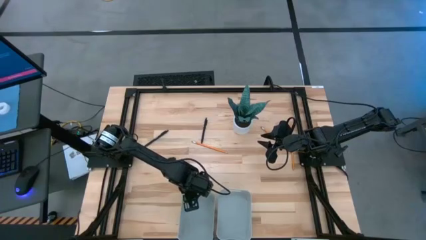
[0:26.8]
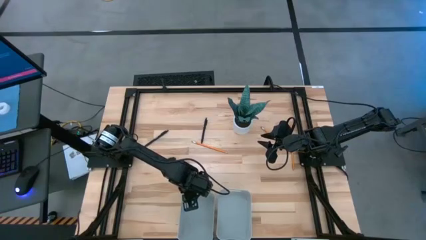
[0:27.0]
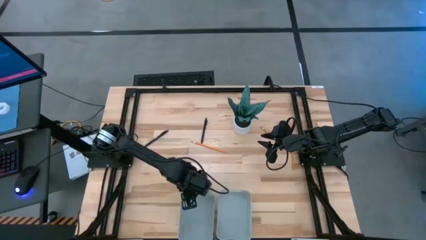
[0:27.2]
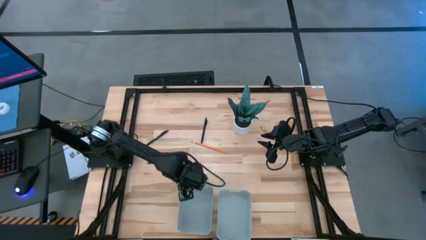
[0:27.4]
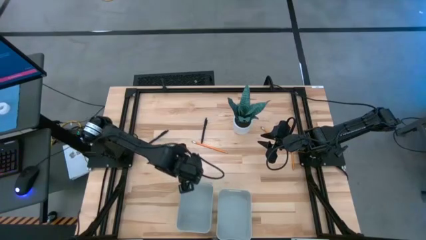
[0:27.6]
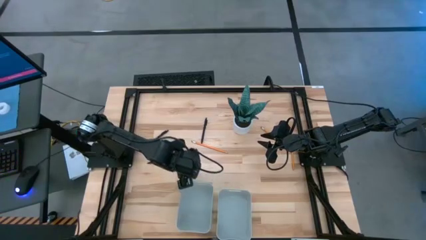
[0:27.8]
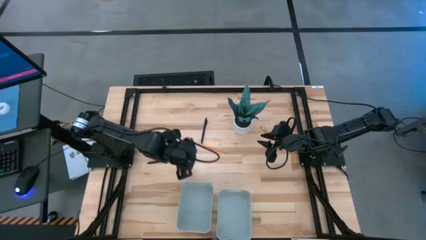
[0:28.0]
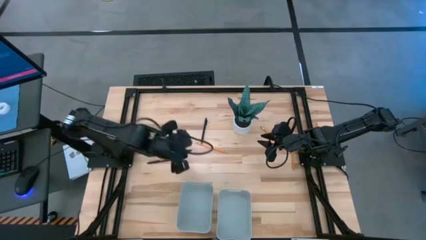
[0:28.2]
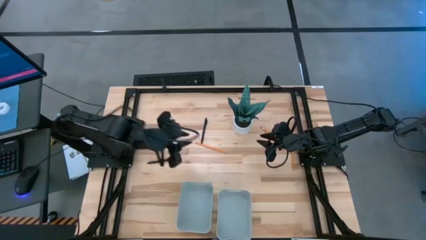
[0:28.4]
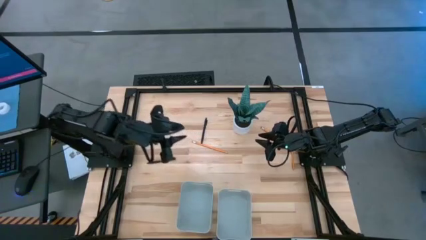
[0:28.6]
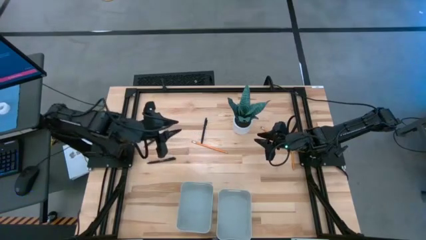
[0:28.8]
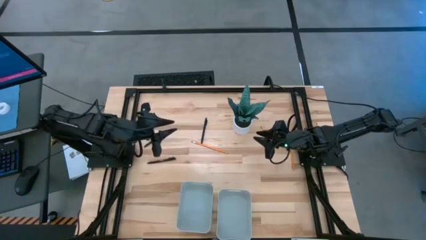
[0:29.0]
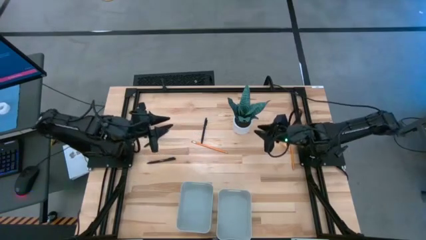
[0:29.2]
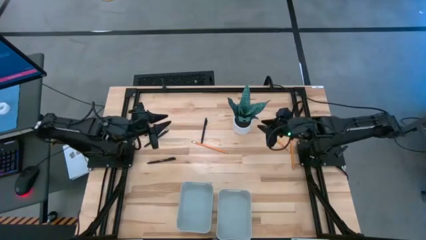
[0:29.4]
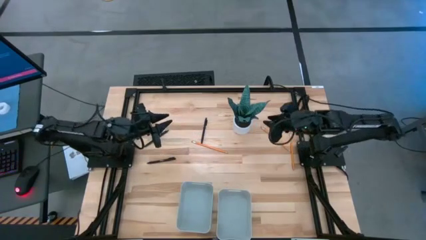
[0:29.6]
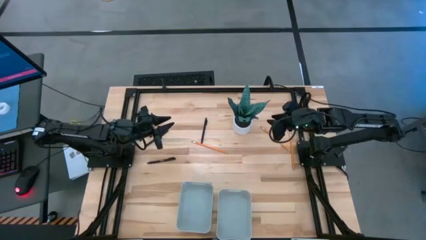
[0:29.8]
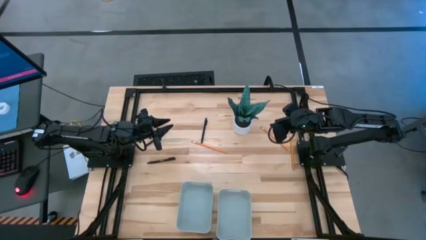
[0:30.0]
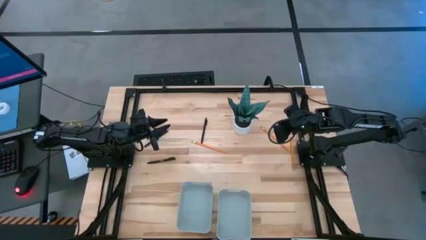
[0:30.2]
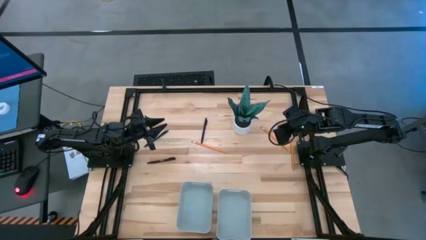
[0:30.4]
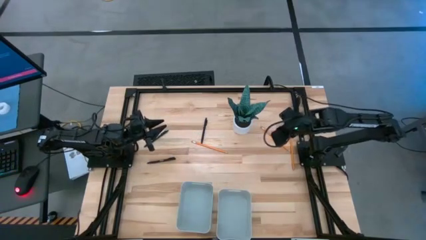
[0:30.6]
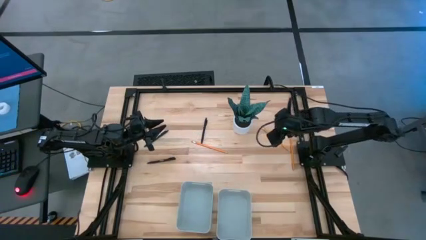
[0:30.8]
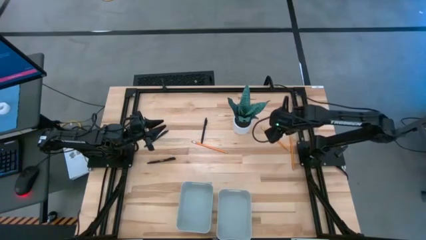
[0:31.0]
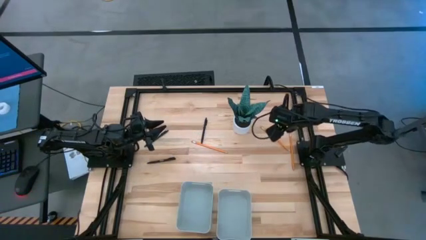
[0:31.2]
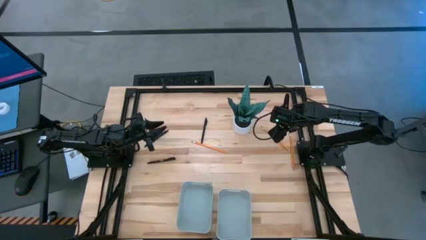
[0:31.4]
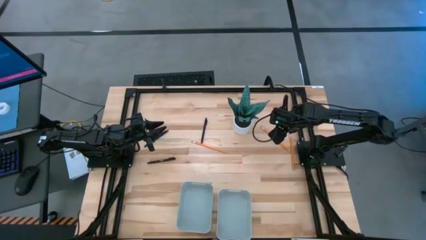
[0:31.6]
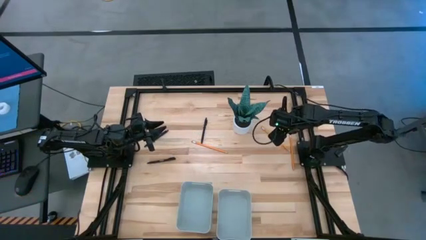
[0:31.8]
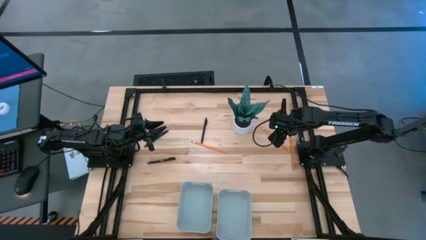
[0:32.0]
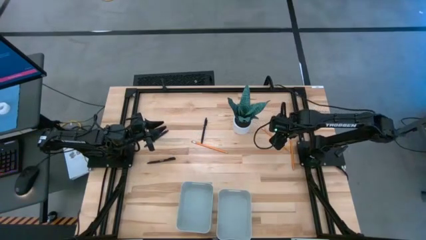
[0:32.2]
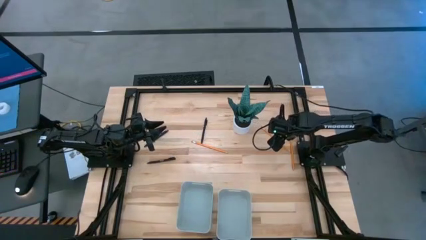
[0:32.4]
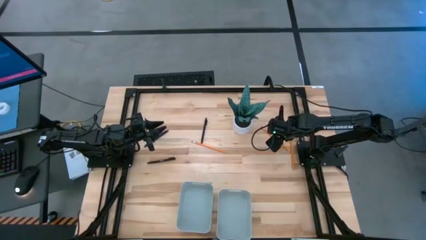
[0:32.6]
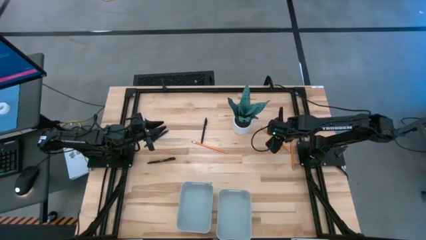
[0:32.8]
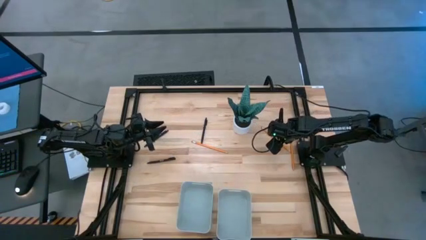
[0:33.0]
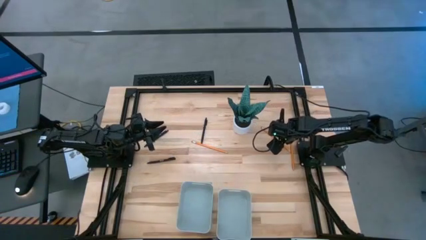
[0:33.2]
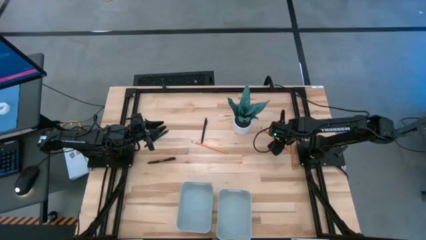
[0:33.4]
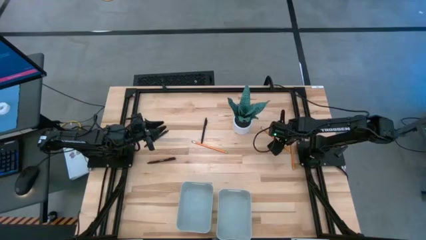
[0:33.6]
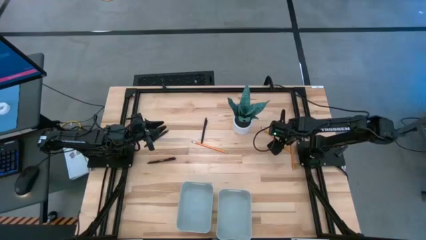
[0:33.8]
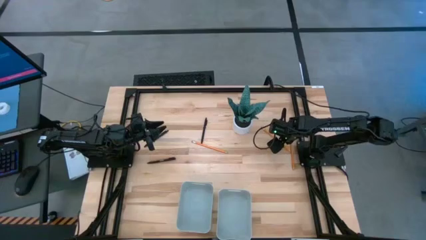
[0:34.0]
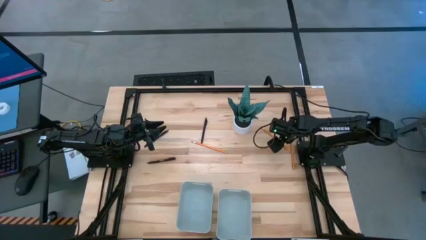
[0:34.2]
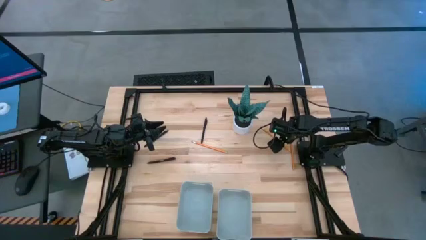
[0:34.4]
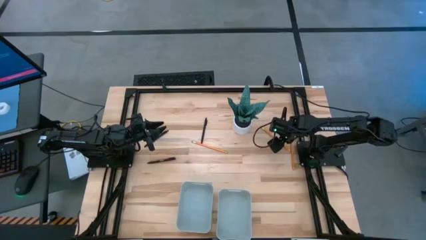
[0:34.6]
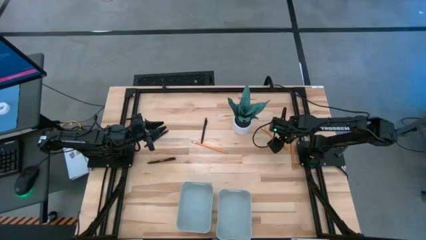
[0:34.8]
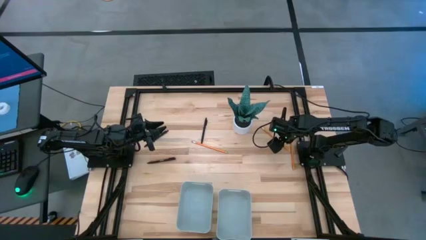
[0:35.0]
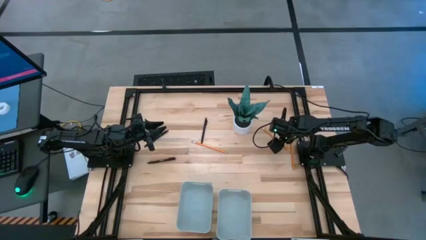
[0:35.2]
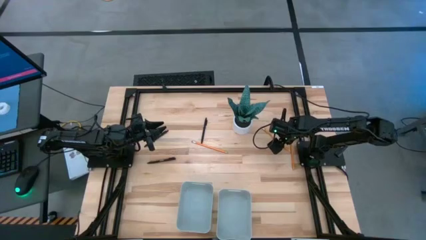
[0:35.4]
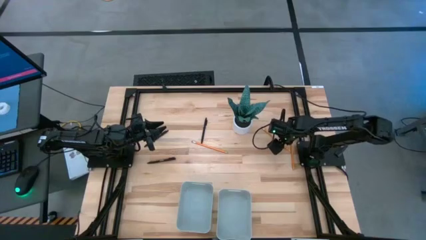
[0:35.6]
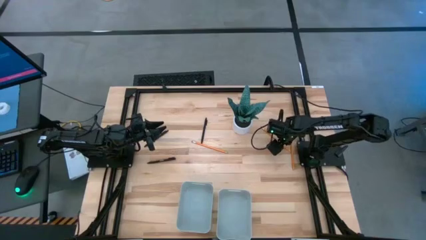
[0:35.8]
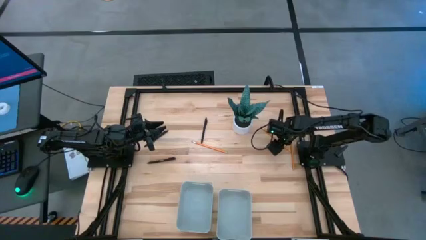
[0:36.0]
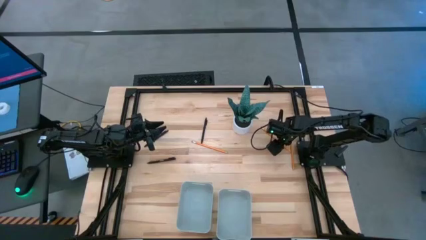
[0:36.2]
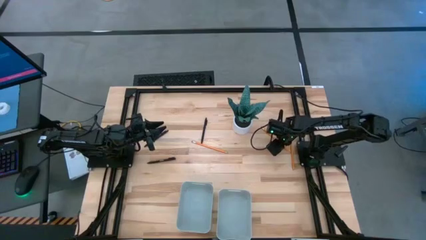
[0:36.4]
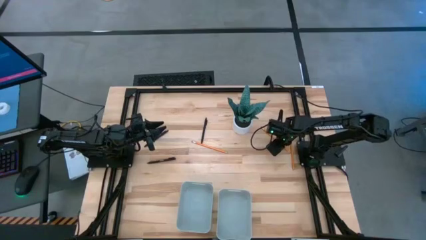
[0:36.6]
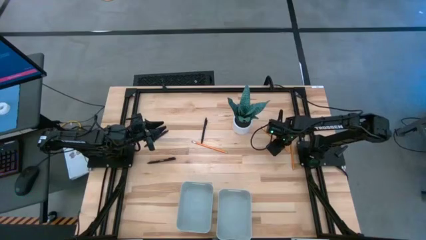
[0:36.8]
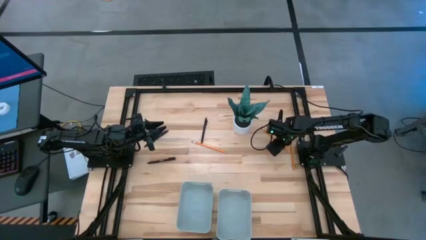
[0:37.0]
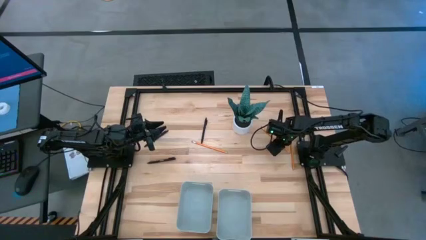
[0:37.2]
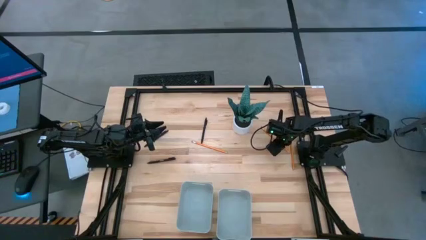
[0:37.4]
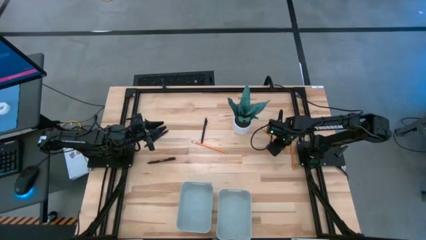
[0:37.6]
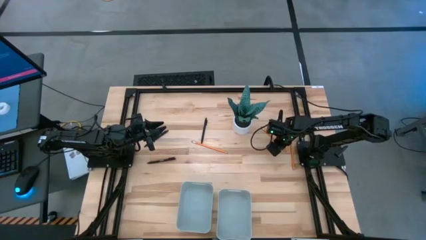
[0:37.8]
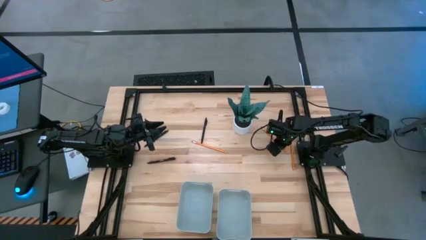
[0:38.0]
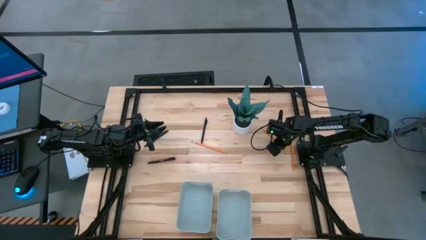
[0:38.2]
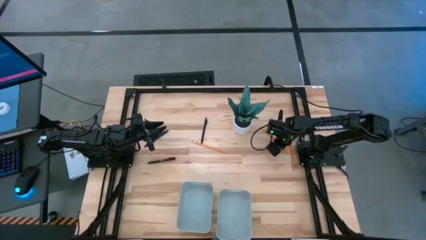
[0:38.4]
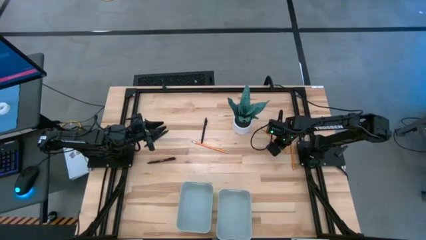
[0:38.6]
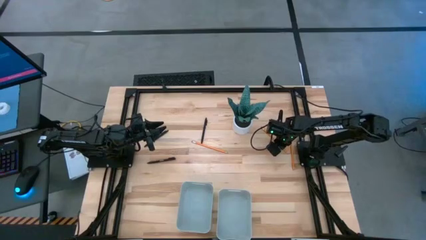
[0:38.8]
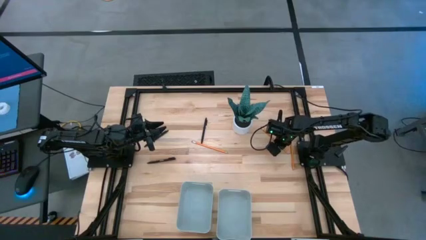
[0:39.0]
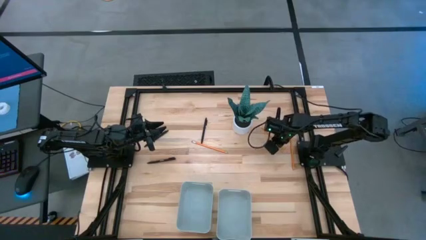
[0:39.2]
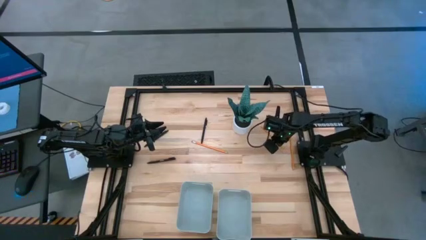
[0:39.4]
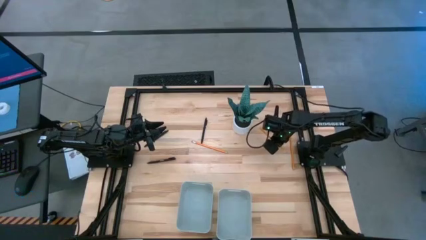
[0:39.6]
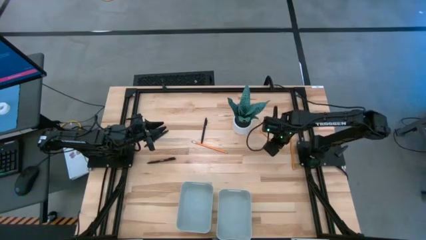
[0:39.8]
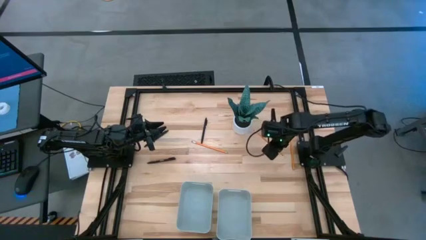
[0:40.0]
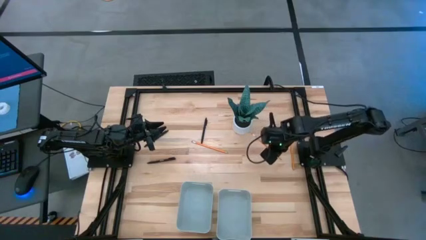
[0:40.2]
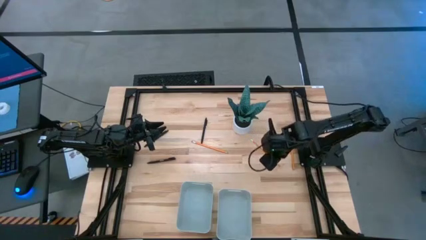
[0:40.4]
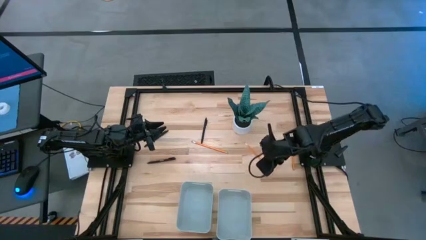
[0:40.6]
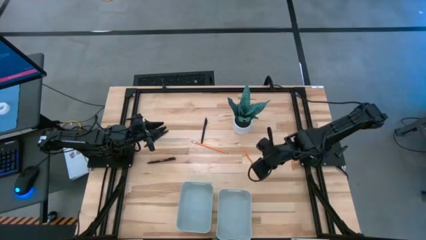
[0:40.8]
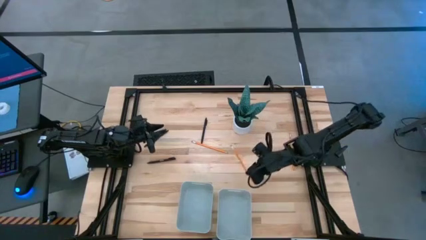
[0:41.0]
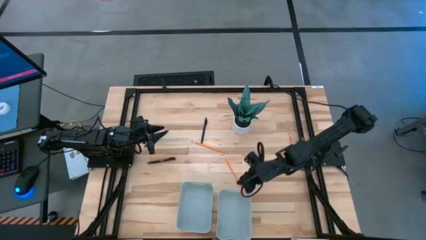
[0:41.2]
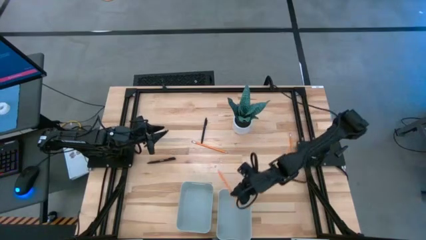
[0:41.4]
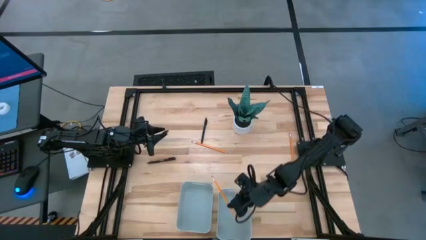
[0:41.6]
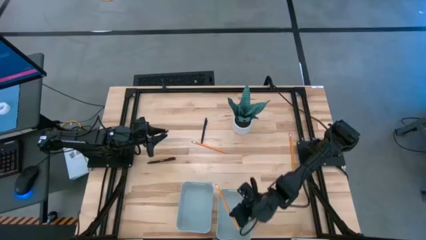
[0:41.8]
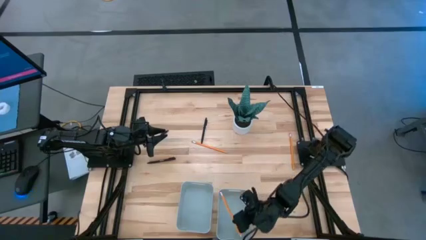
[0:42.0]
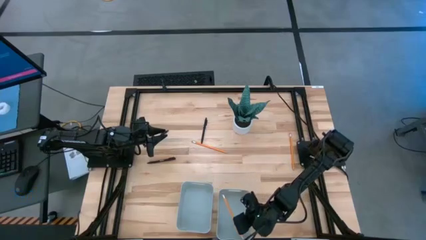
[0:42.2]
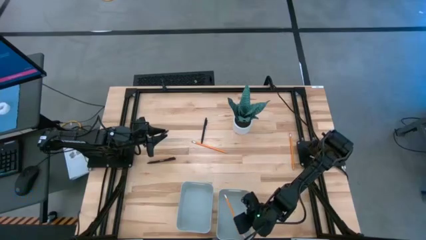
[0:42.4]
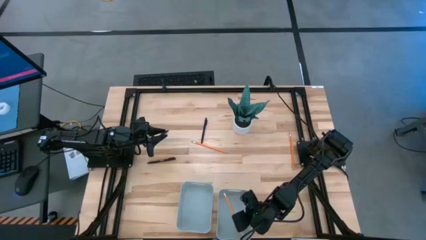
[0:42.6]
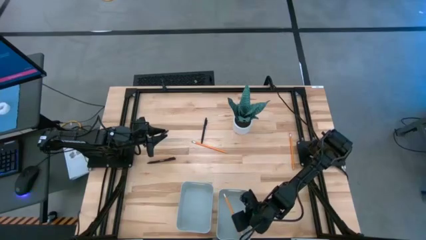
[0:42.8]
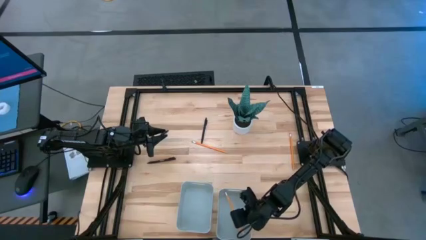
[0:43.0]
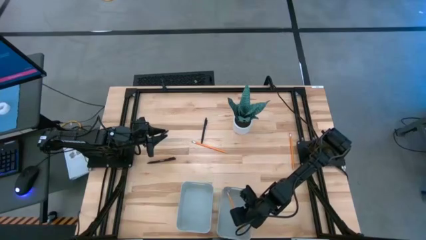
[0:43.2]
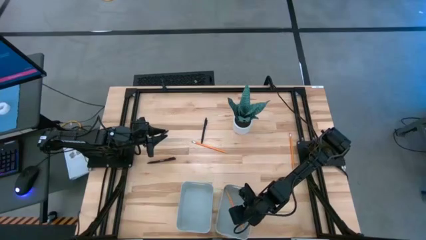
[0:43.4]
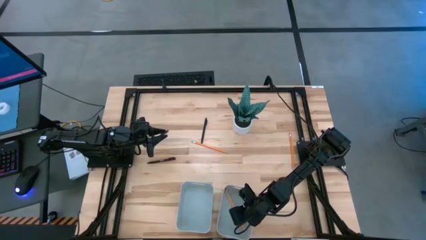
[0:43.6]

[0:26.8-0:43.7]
Task: Sort pens & pencils
Put the middle pencil into the right gray bin
